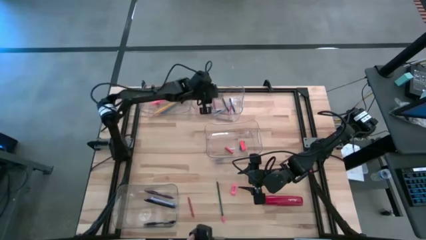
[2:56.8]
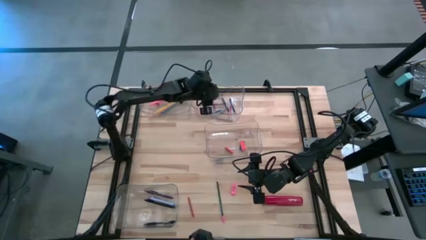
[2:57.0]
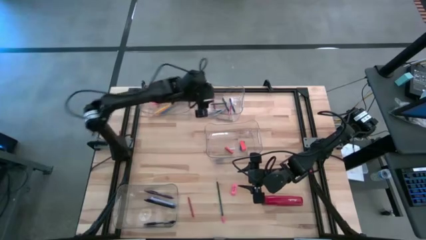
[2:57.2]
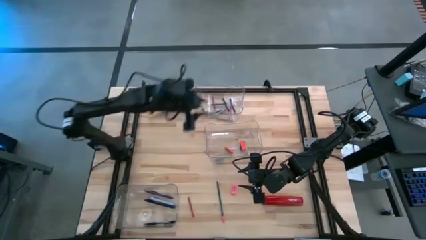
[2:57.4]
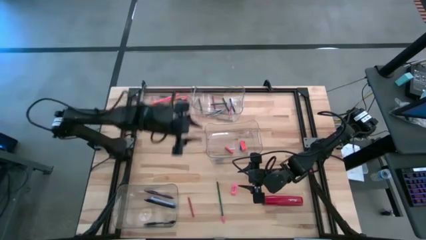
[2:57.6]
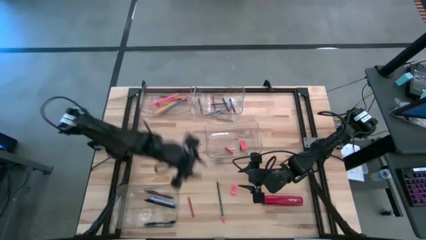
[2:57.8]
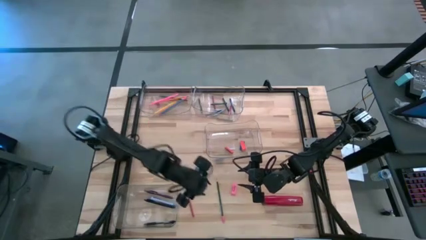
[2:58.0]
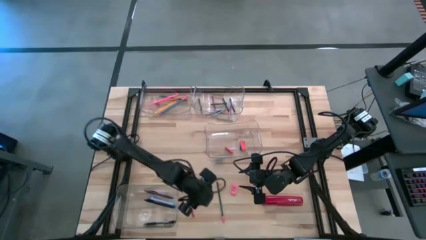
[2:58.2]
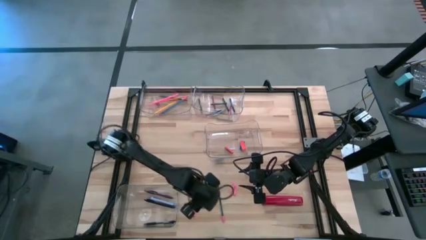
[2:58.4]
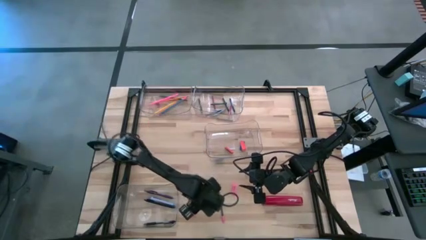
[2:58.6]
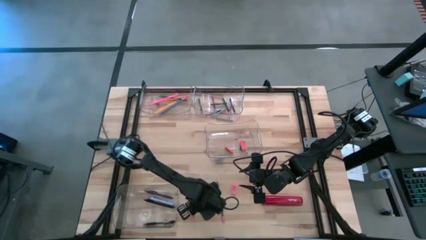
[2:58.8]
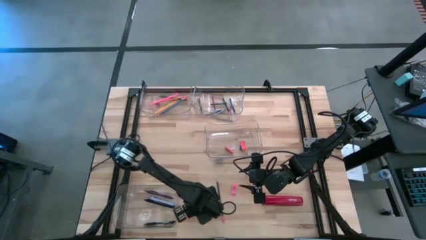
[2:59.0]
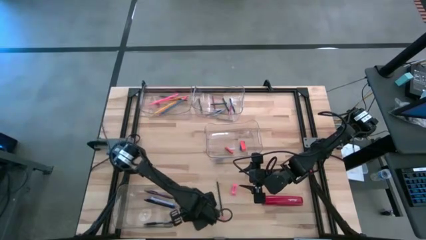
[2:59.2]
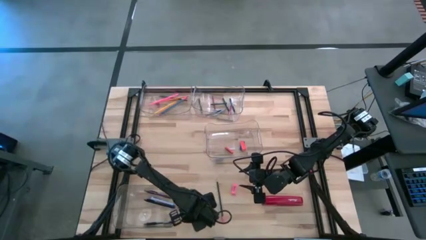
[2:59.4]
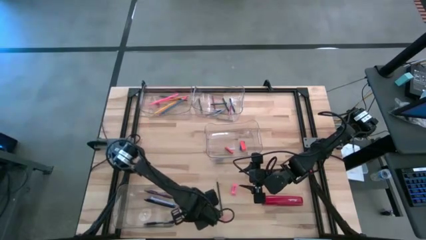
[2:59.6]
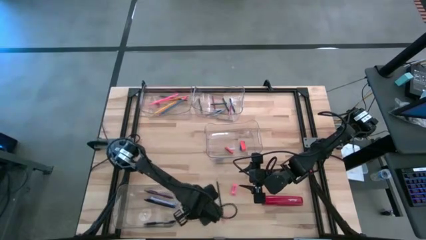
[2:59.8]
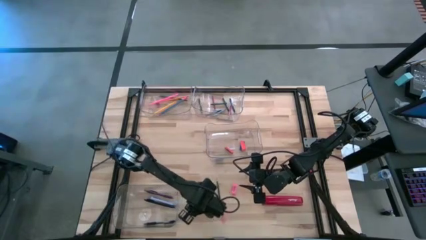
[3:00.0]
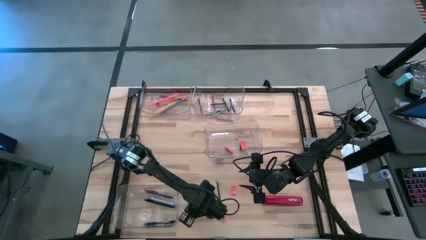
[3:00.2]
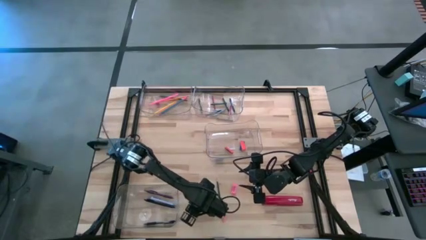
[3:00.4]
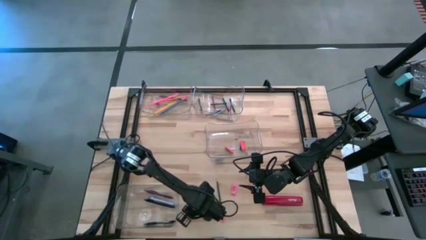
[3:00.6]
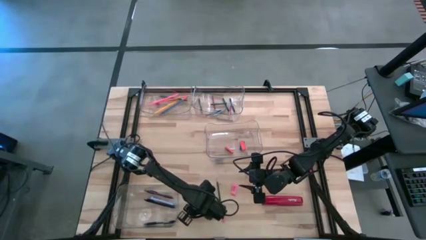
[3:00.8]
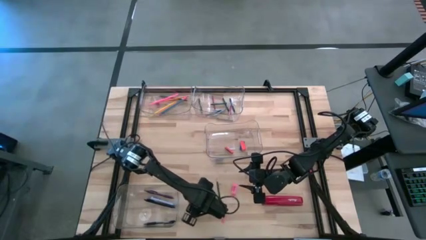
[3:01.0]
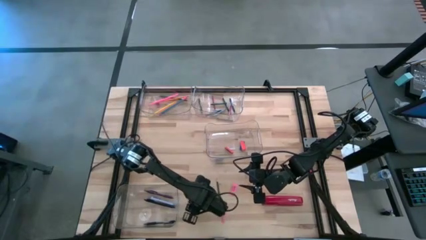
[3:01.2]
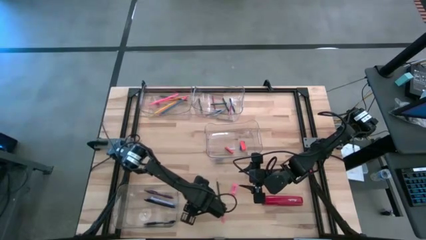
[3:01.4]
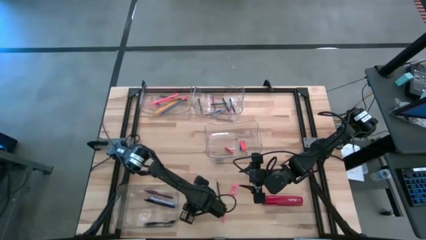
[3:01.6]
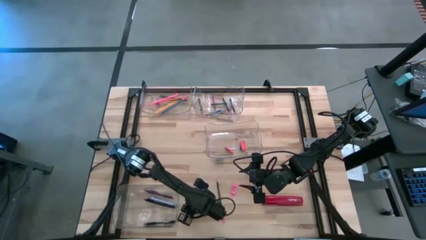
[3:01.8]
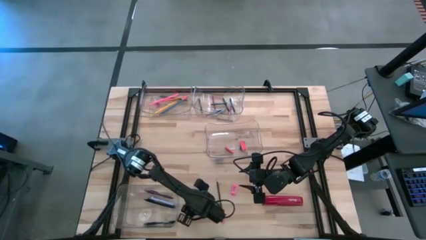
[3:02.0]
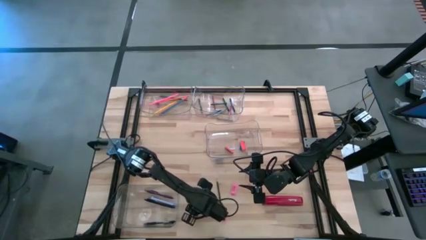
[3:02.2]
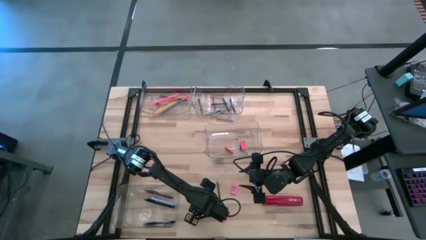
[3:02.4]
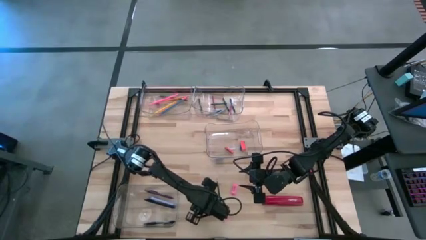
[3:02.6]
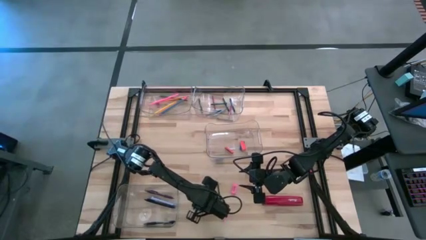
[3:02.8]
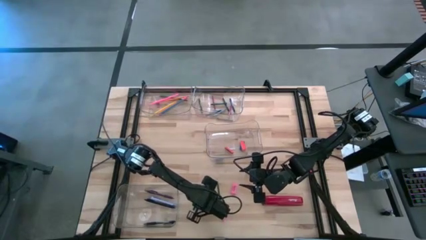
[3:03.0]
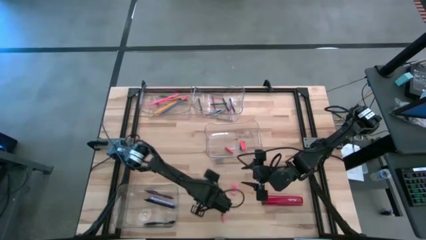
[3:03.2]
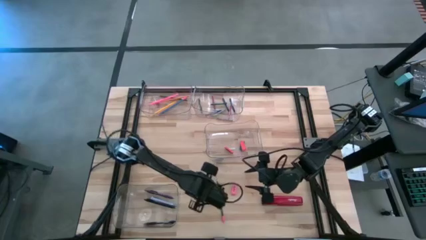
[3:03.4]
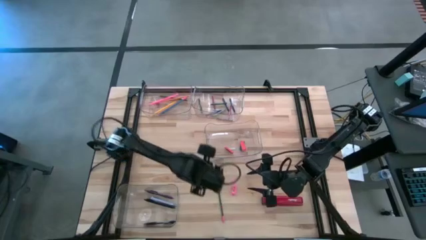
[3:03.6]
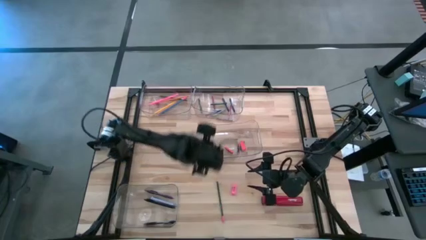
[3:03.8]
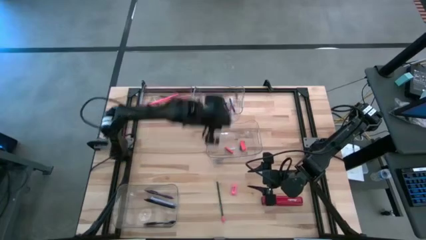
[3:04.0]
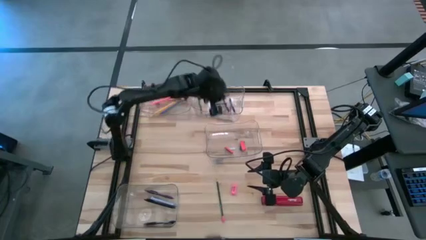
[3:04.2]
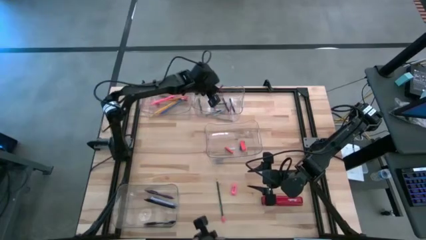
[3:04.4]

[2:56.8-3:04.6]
Task: Sort crayons/erasers/pens/pencils in bins
Put the red crayon into the top right transparent bin

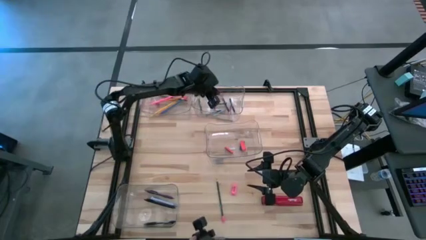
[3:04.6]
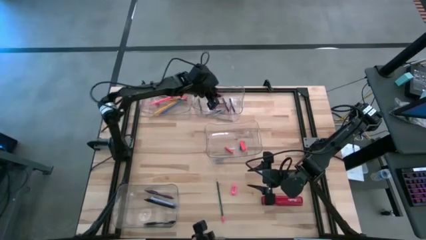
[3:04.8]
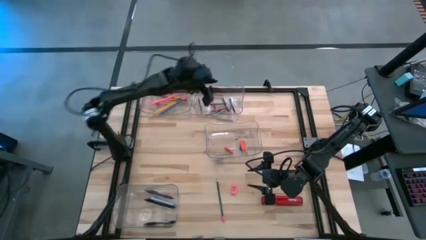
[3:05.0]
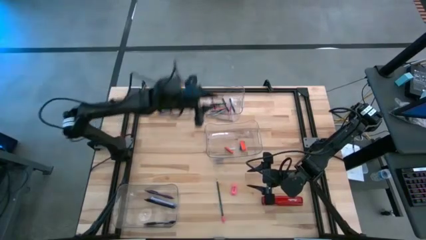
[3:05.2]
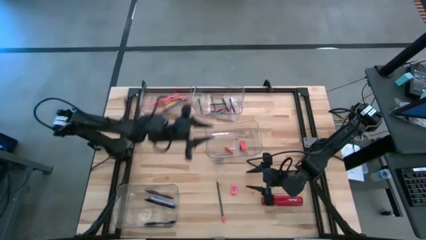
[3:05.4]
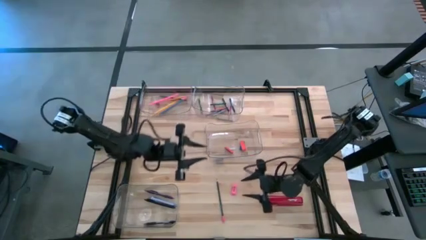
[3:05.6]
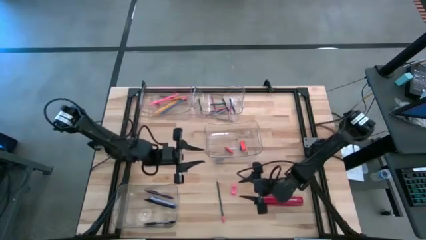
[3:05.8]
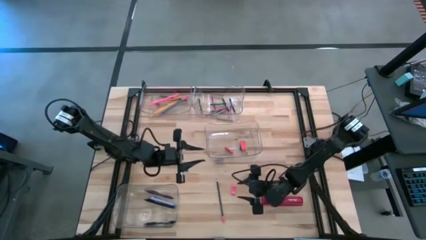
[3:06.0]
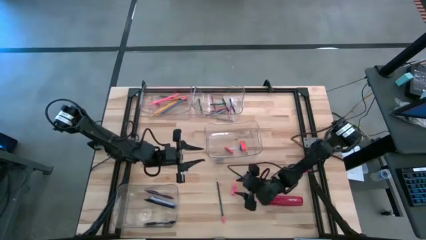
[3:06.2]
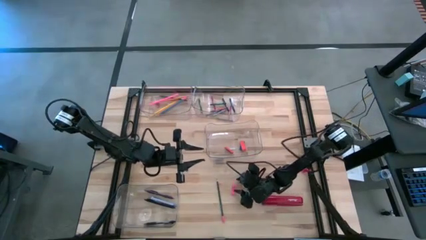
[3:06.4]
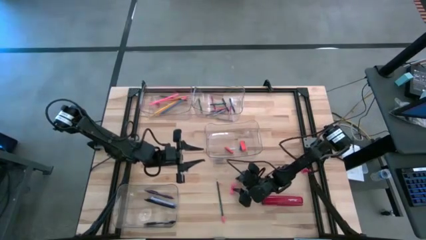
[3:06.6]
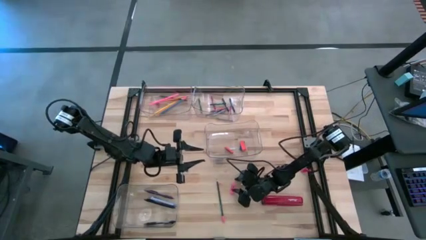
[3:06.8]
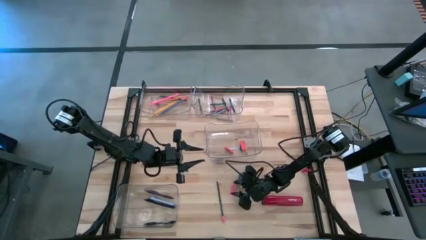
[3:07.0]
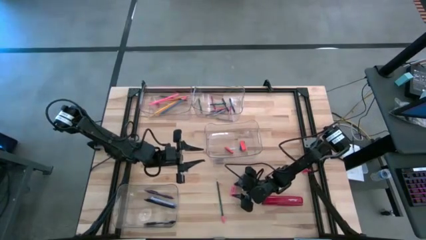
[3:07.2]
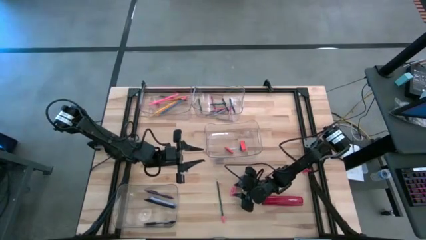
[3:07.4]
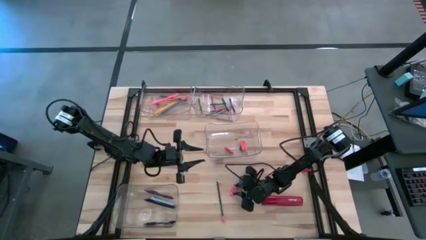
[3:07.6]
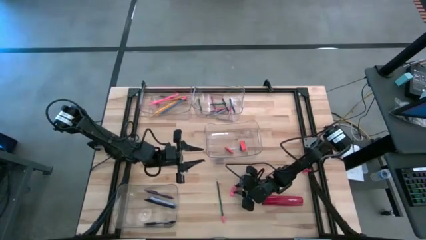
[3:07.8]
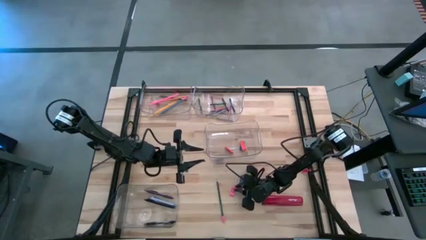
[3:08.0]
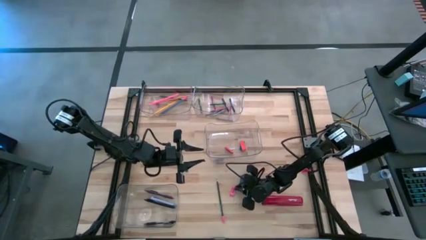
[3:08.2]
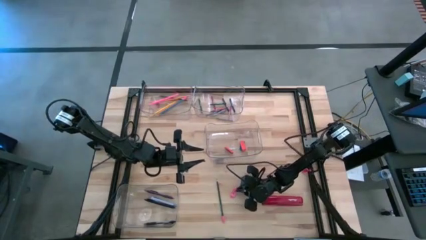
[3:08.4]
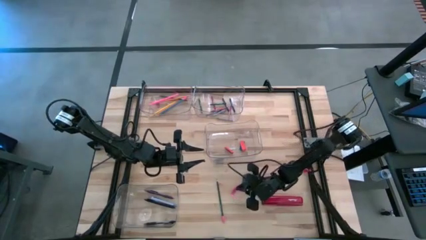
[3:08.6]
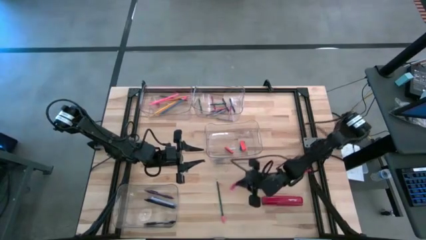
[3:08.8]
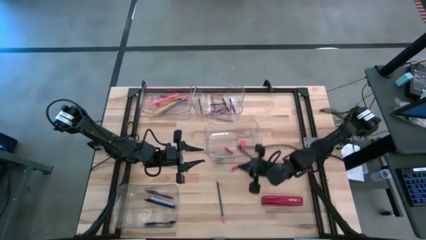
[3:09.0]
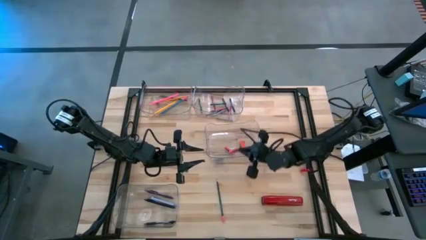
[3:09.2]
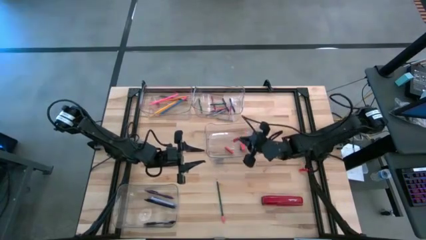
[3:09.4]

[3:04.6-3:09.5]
Put the pink eraser into the middle transparent bin

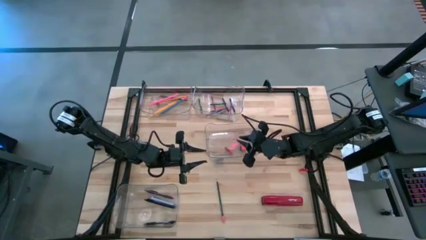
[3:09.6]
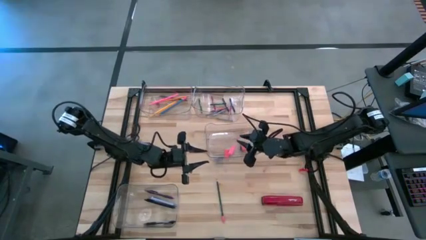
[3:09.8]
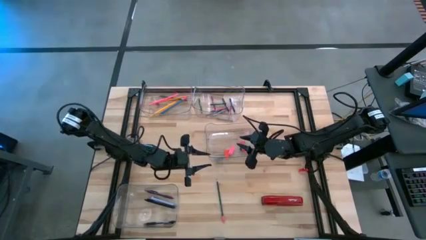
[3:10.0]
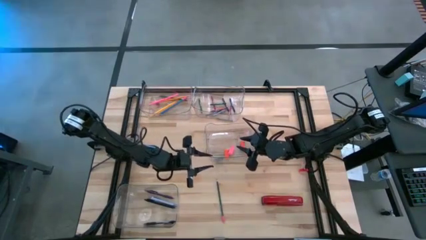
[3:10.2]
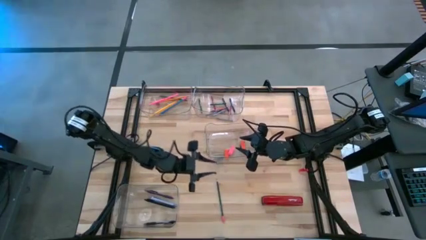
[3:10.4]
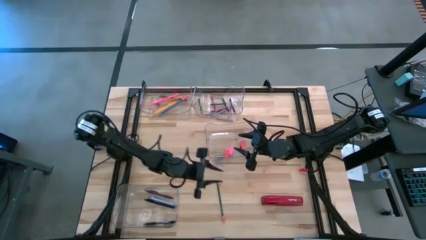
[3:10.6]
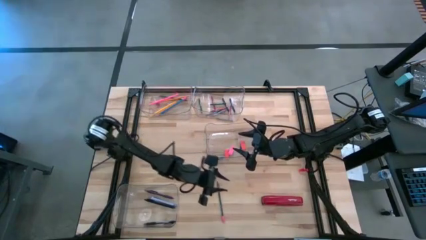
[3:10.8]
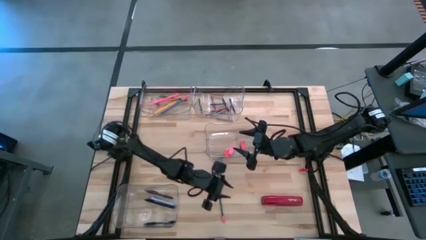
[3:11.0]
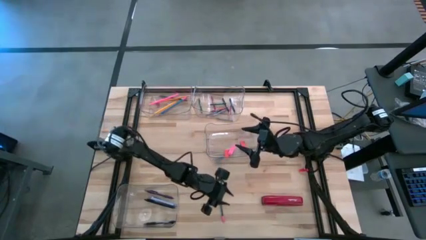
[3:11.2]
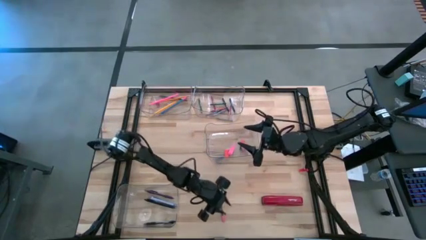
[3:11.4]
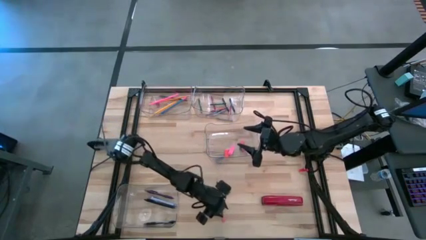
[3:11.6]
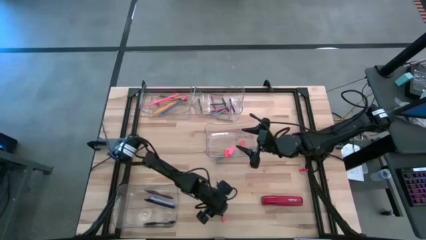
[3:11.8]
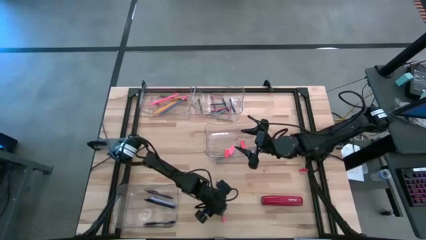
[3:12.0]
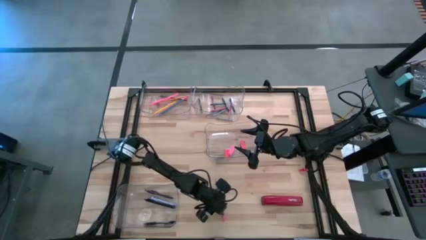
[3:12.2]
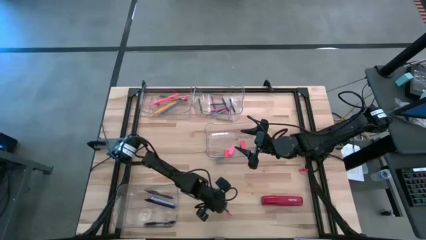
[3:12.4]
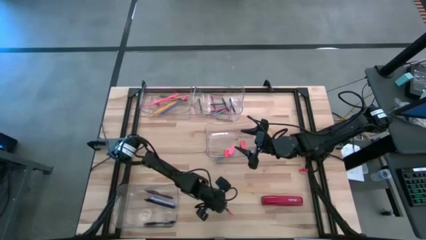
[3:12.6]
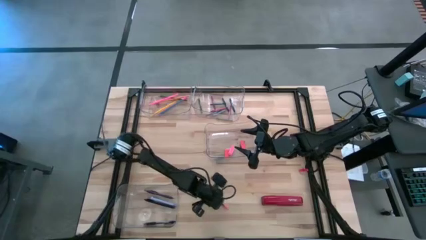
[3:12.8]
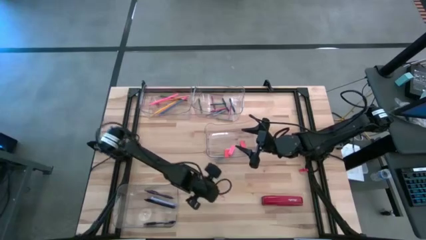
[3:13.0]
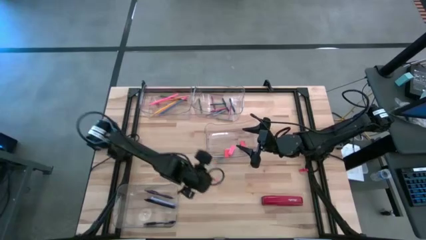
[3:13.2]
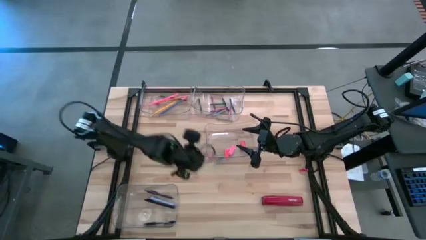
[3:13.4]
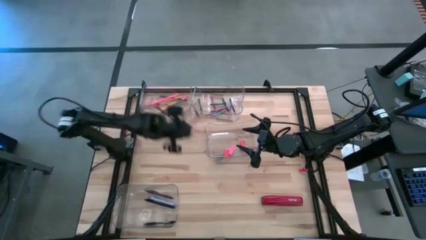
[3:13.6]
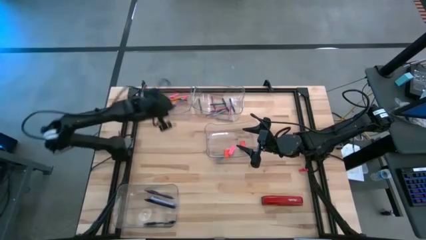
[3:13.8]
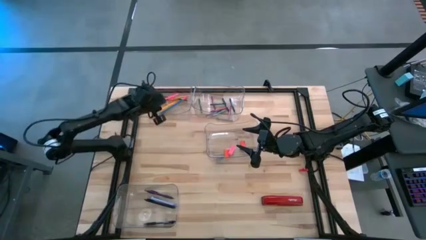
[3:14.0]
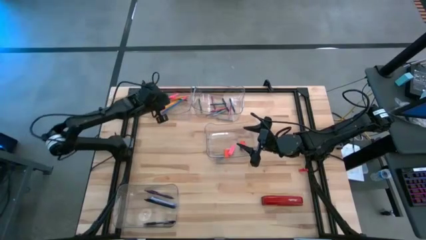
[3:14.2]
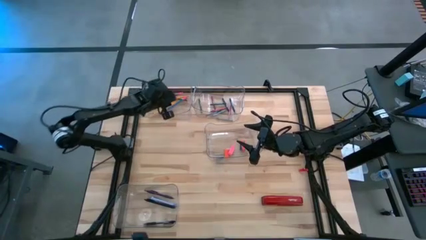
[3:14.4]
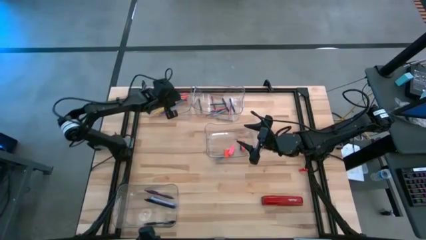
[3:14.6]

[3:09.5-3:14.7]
Put the green pencil into the top left transparent bin
